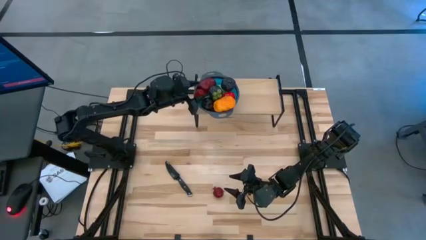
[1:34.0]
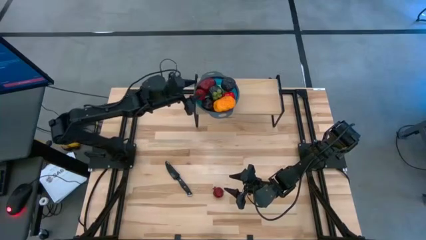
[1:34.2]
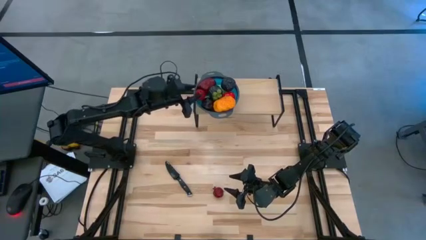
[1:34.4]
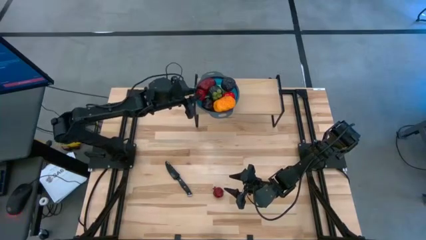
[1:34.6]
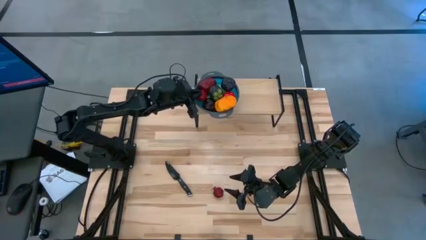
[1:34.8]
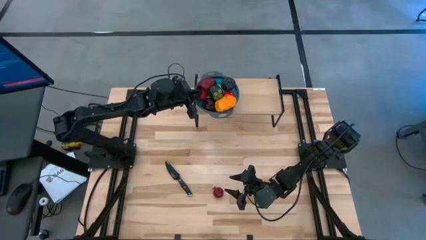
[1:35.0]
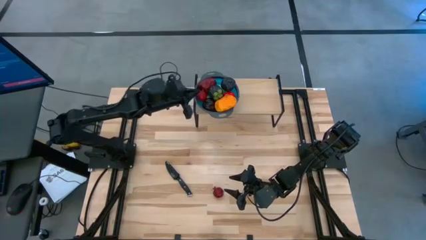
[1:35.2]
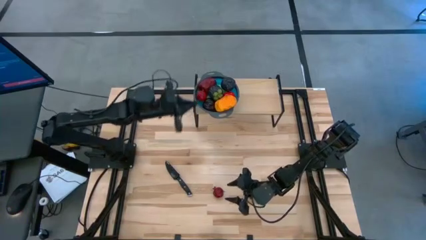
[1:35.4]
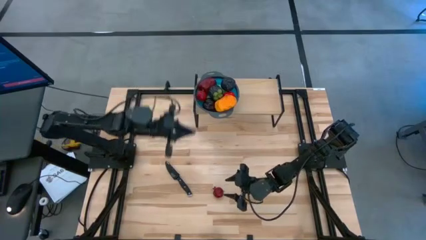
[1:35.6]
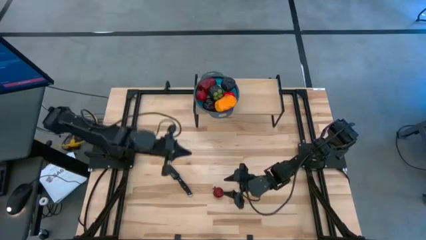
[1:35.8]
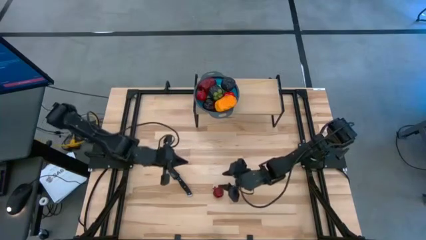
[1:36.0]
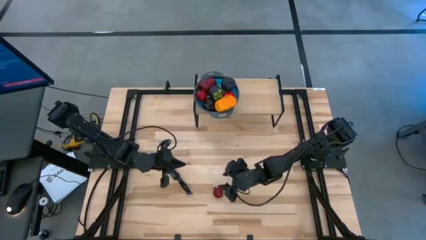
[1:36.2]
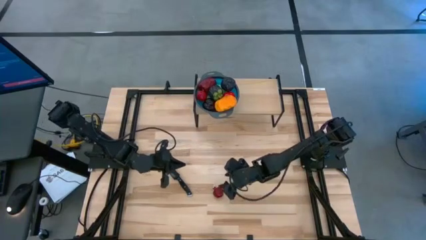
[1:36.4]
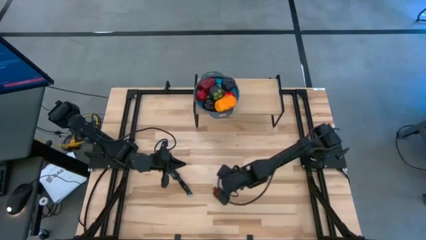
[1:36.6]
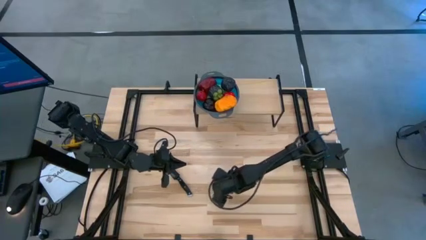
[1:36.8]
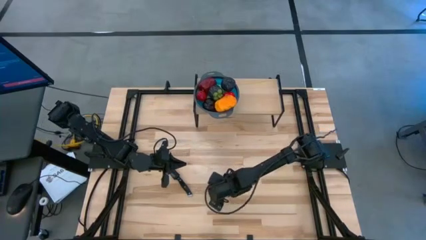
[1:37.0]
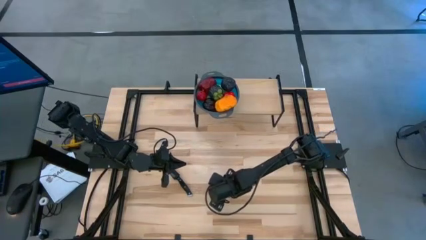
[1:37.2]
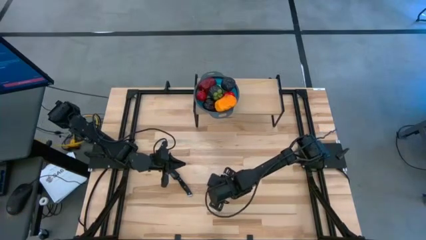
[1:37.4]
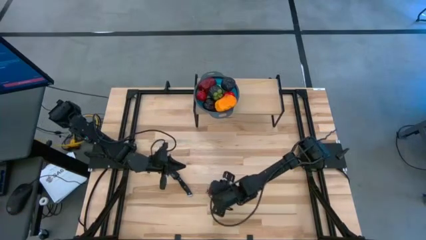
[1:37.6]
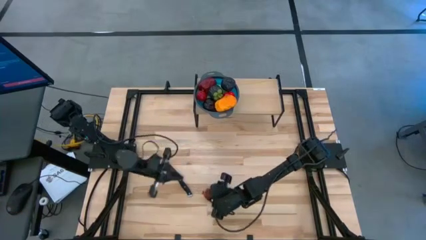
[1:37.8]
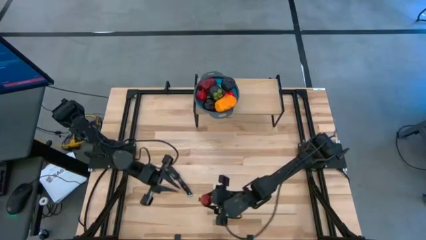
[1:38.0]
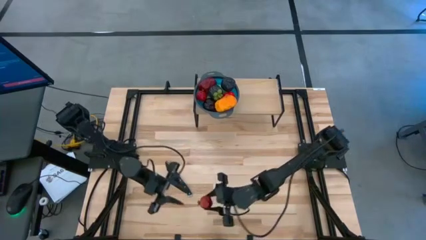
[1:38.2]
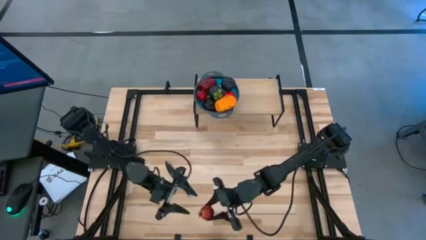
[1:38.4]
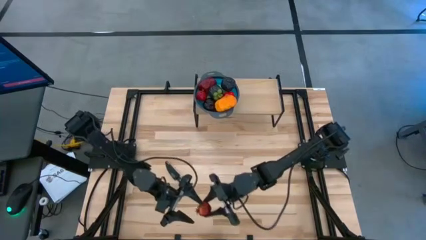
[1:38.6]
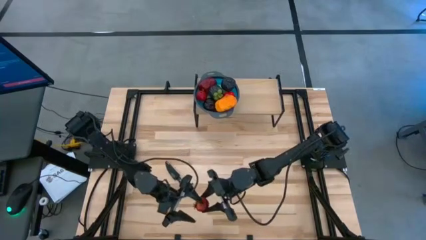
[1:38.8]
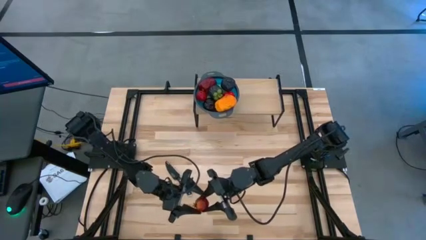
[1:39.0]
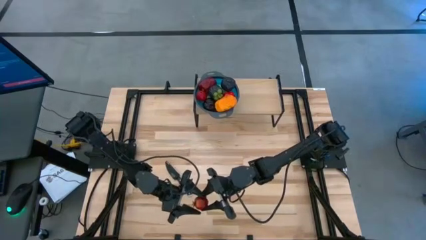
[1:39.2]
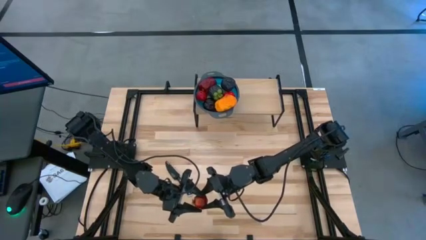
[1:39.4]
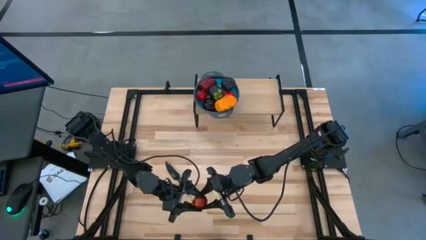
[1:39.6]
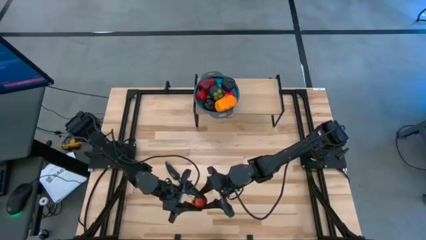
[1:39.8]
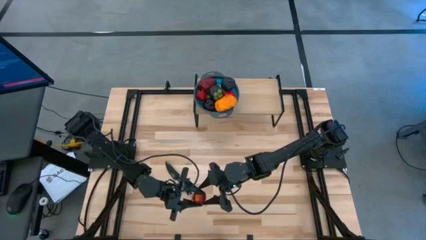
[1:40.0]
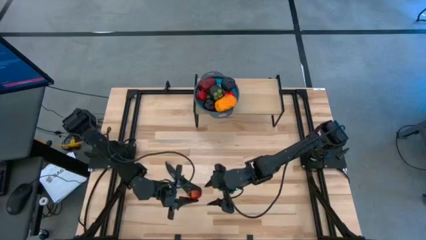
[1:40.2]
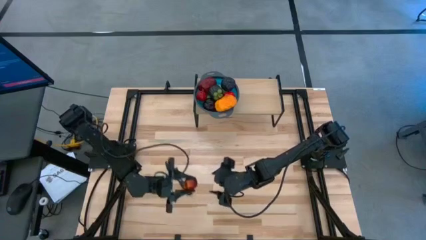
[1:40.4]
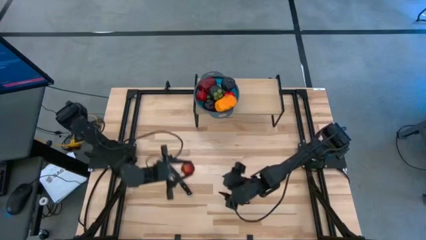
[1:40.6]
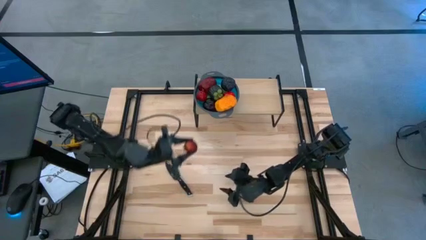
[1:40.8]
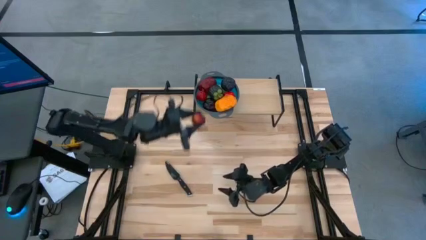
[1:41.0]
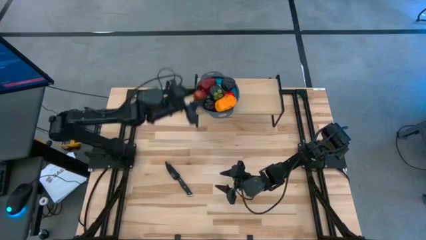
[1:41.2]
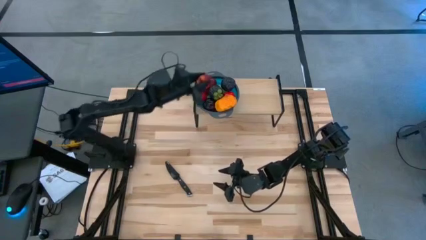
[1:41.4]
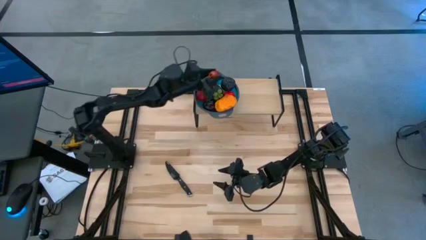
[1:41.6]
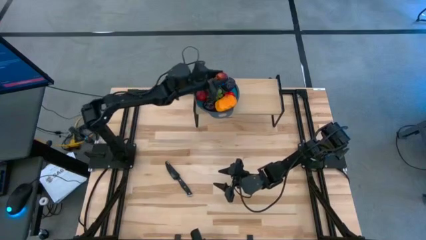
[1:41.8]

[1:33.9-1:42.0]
Task: Pick & Place Fruit
Put the red pomegranate into the blue strainer bowl on the shelf

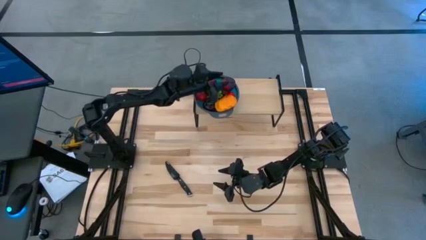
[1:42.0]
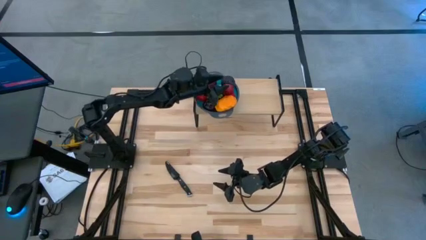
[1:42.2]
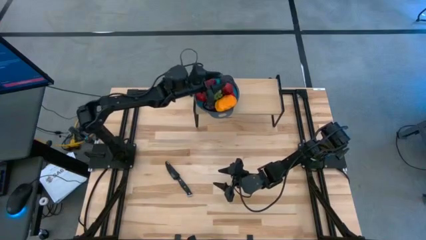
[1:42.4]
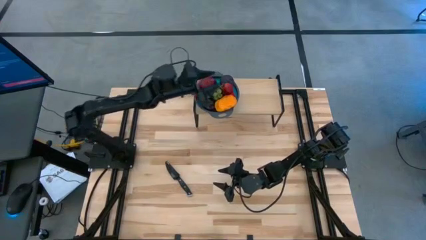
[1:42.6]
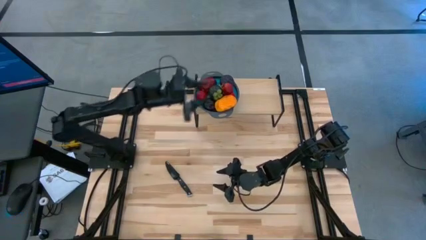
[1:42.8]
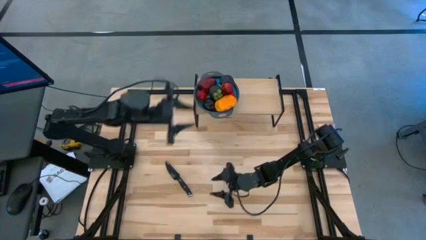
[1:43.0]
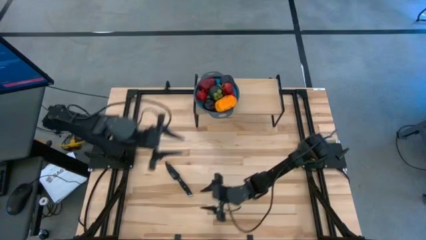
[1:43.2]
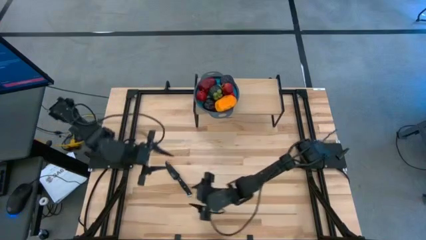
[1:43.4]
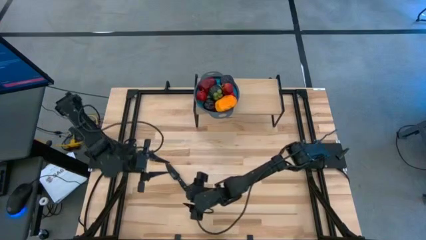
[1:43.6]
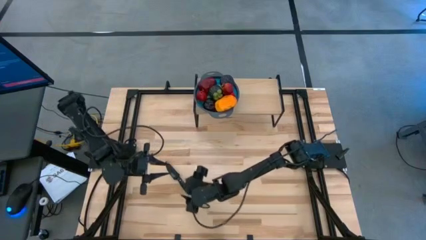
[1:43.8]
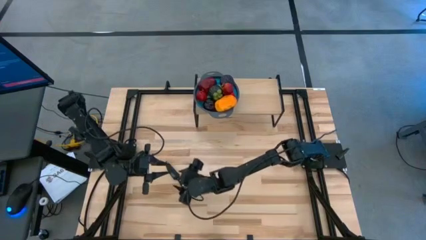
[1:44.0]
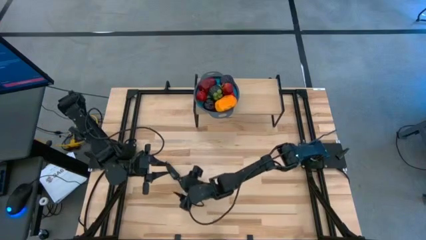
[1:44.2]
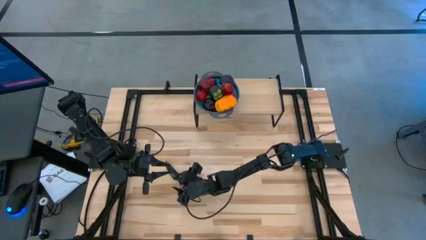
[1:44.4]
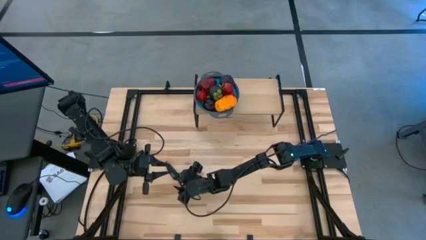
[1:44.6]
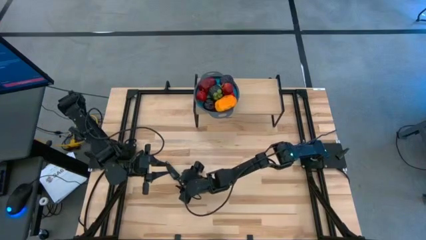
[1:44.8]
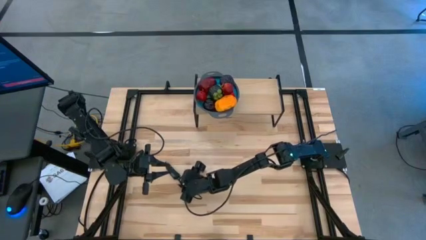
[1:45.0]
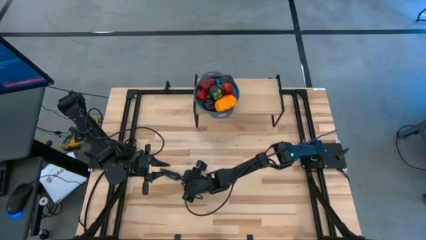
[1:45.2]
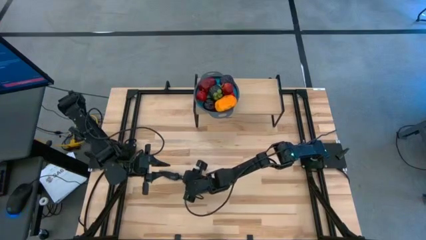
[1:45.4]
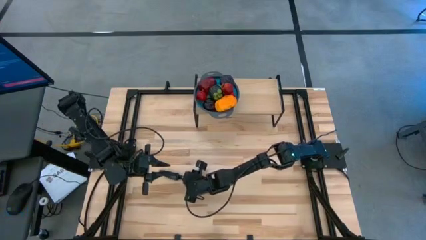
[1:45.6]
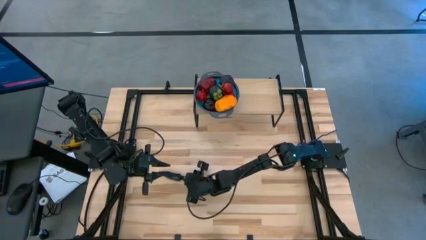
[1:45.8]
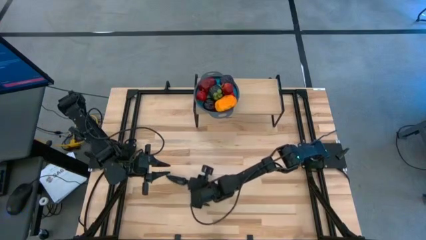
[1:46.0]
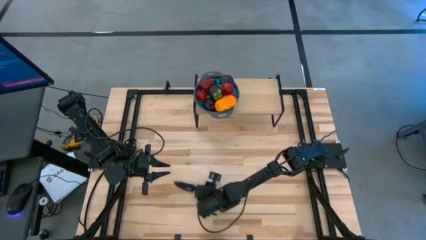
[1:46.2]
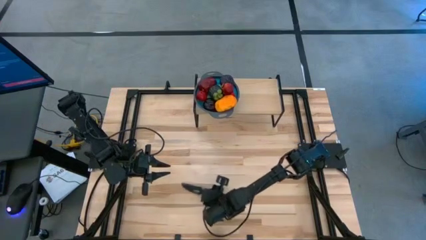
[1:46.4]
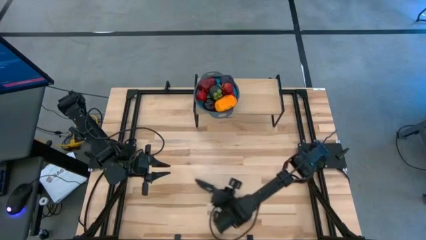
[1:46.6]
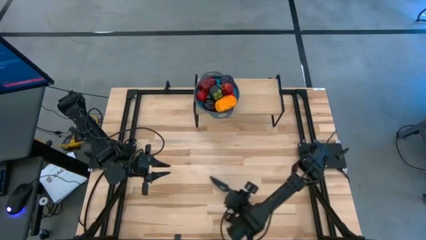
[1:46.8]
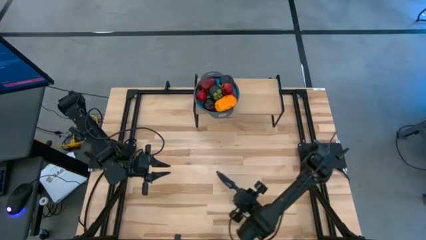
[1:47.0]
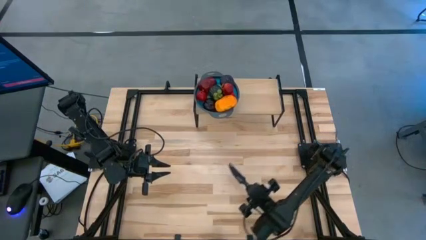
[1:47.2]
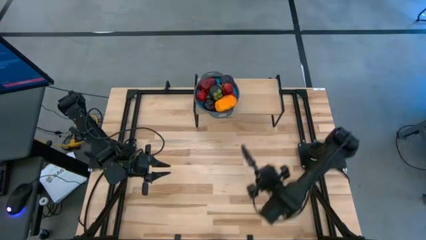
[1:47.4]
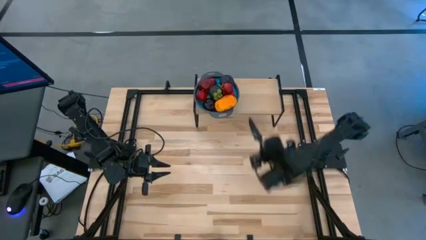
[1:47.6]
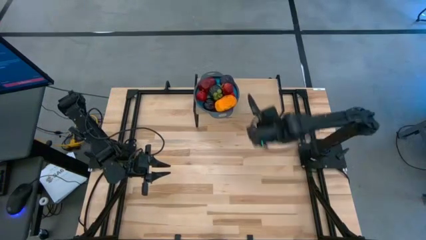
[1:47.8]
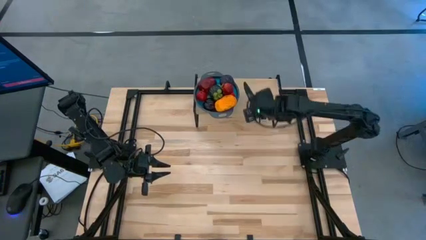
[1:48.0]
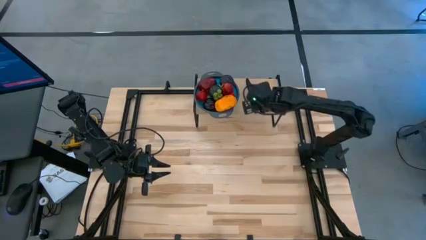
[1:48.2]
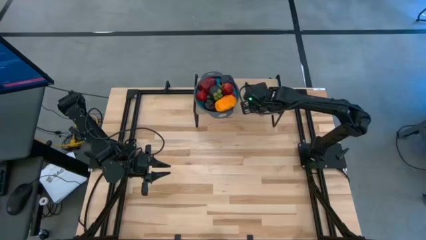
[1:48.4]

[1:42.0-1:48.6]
Put the black table knife on the shelf to the right of the blue strainer bowl

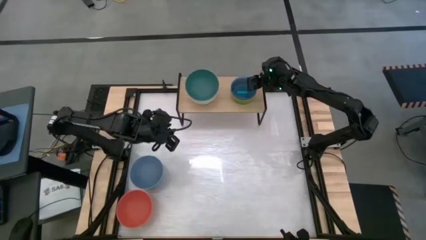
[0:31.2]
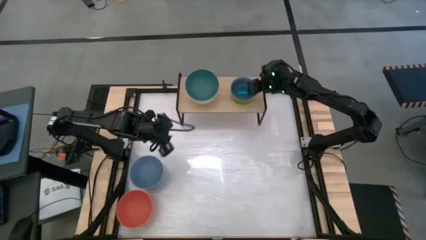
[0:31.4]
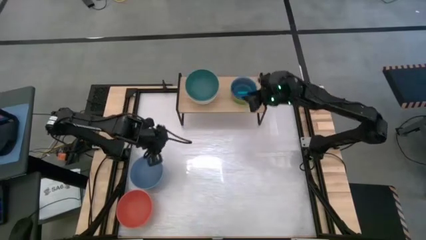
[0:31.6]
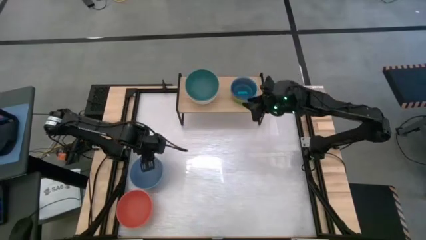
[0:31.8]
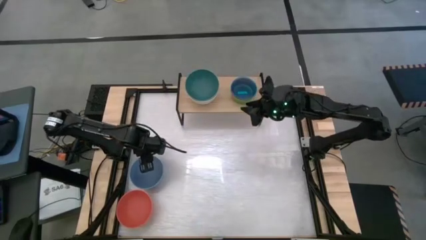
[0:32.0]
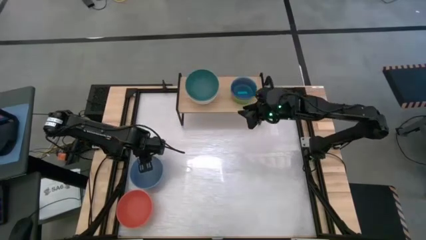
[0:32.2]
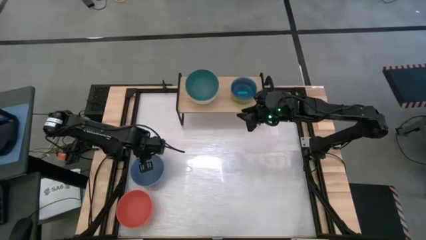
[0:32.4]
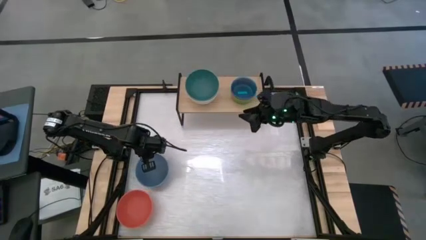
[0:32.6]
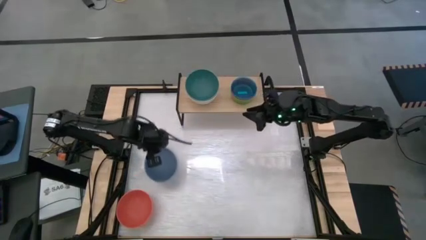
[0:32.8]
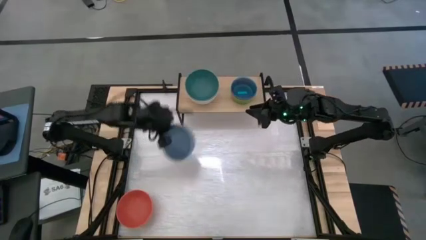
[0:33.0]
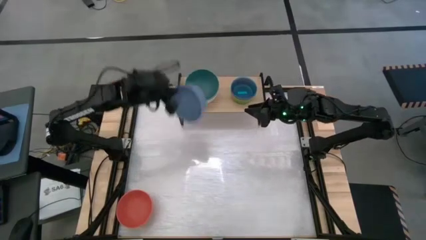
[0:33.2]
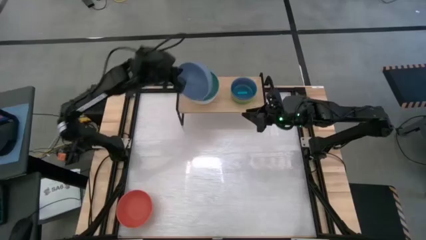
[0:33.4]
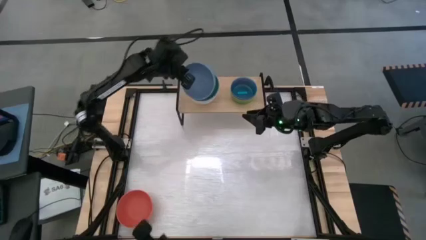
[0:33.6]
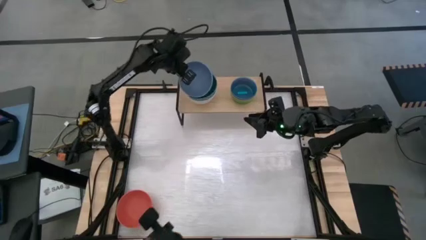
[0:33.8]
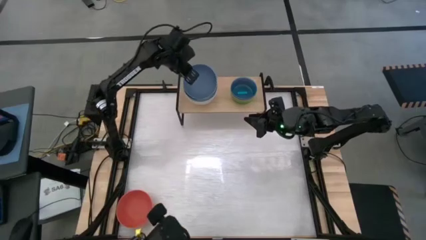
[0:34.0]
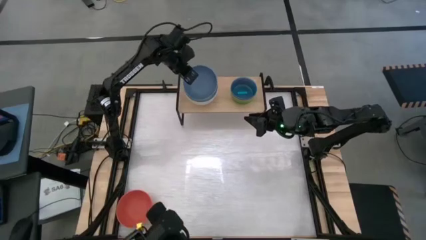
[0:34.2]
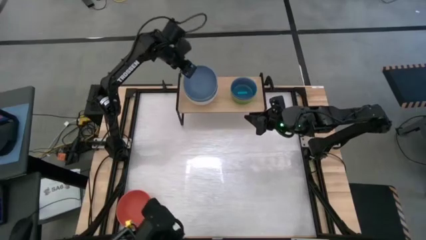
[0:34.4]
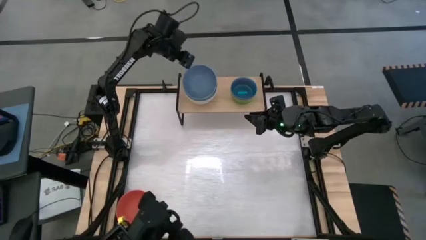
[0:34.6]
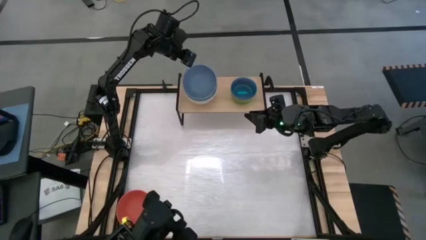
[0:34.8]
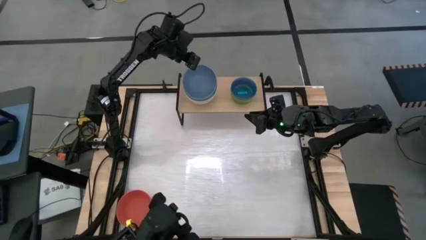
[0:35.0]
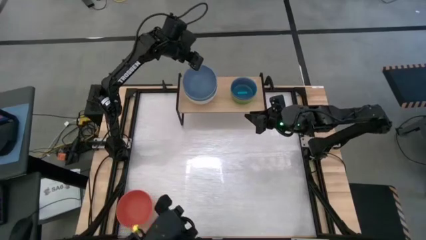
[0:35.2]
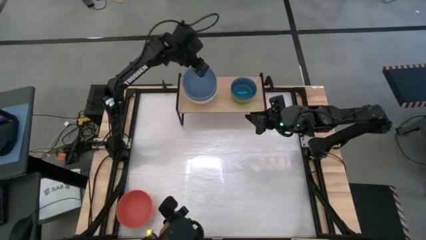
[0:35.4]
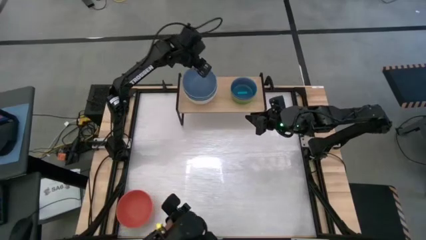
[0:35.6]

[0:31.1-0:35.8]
Task: Place and stack bowls onto a shelf
Stack the large light blue on top of the large dark green bowl on the shelf
